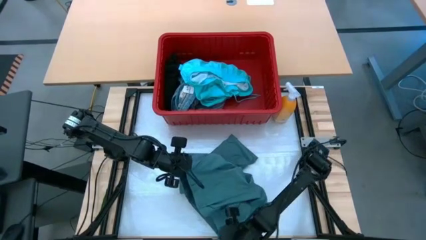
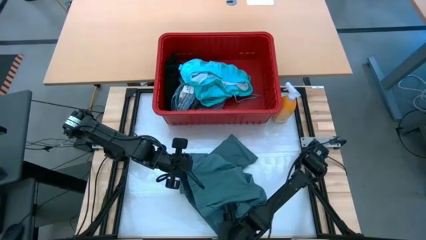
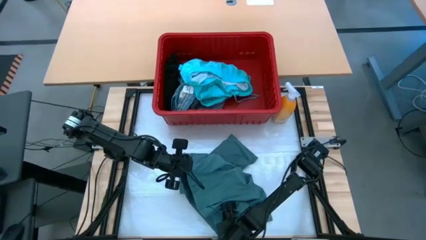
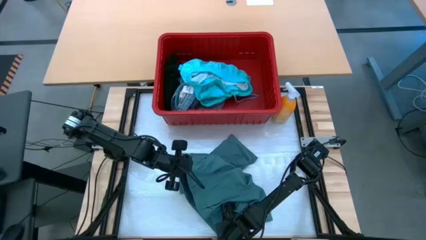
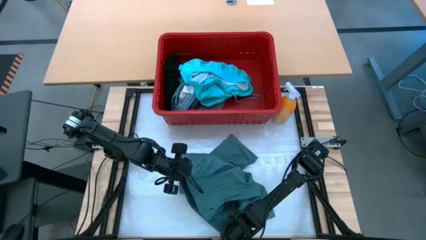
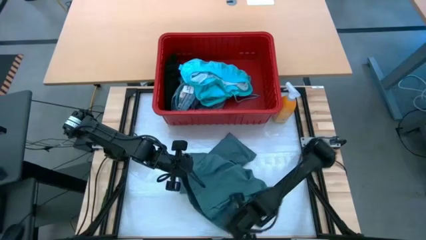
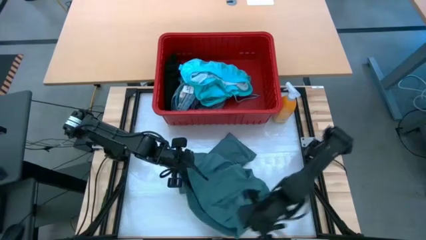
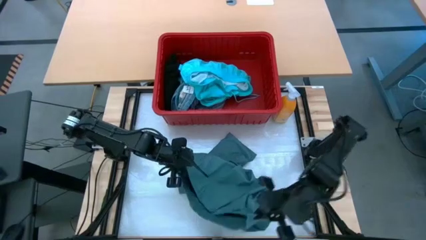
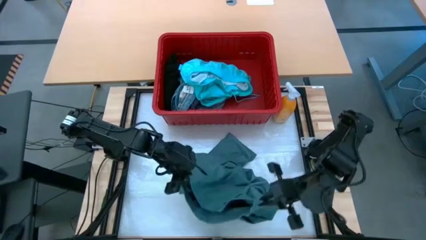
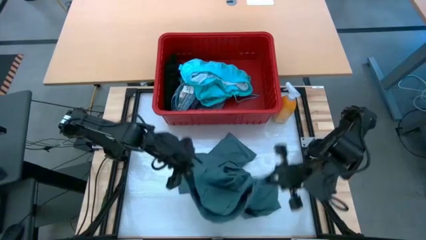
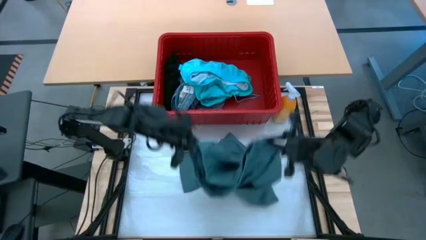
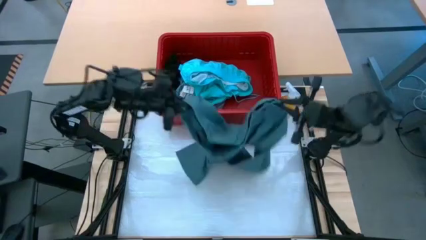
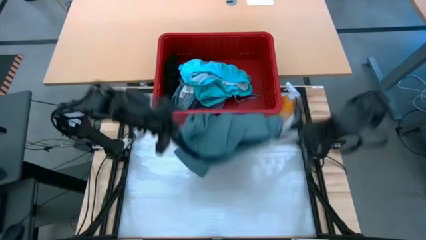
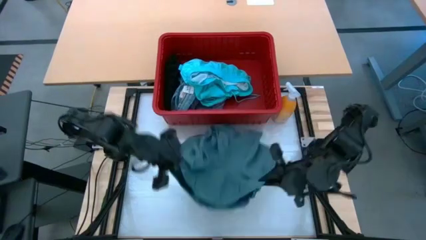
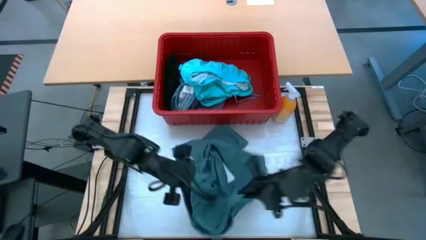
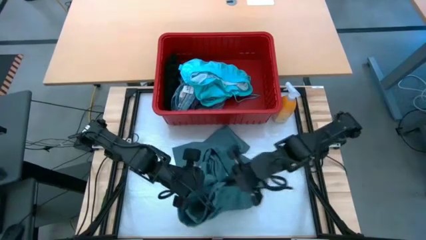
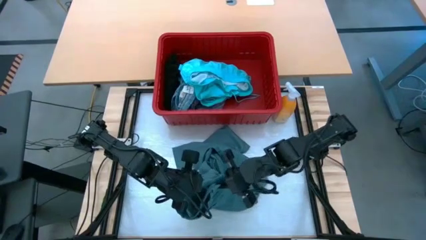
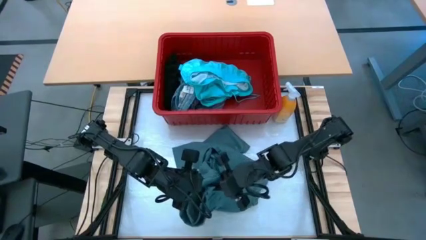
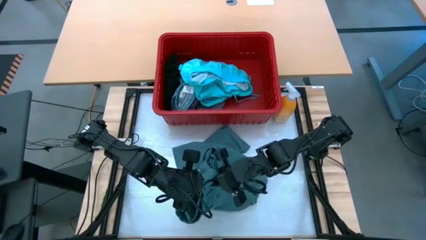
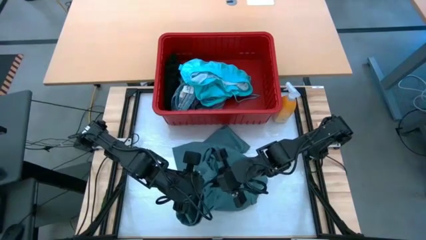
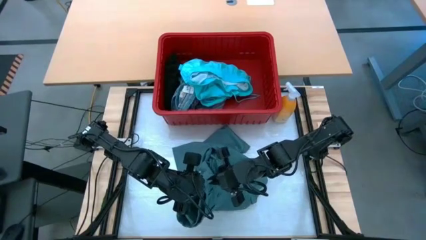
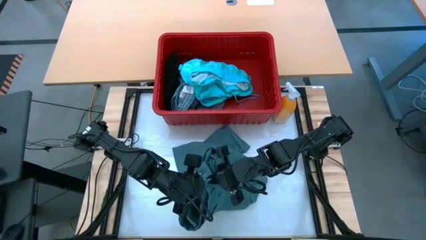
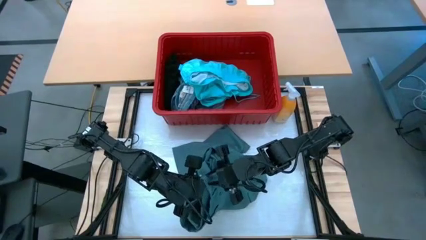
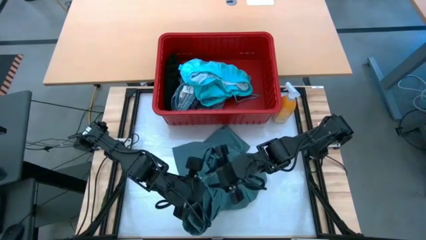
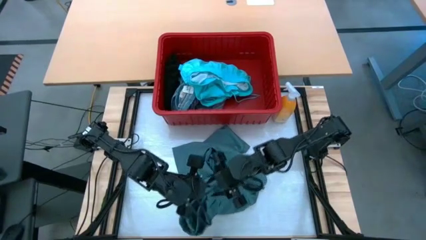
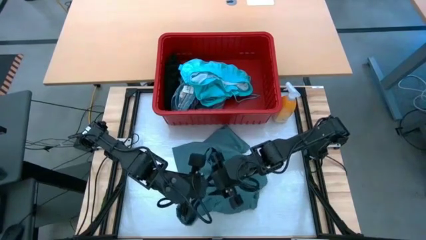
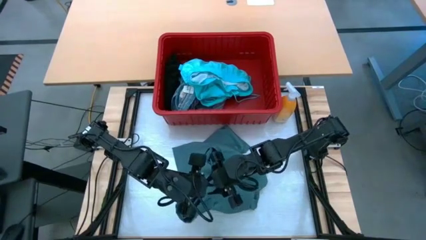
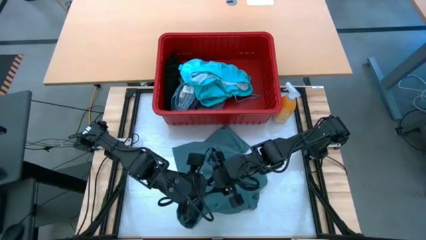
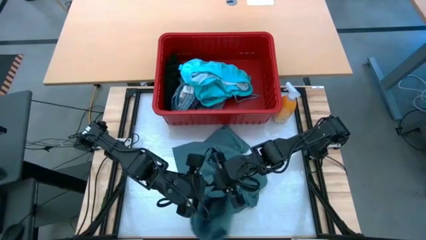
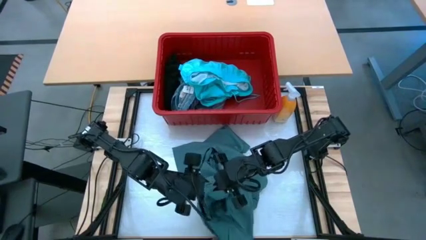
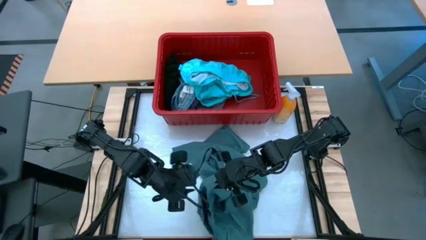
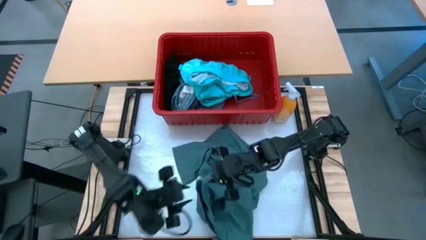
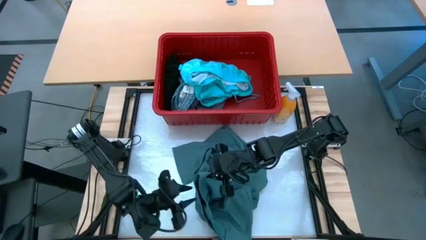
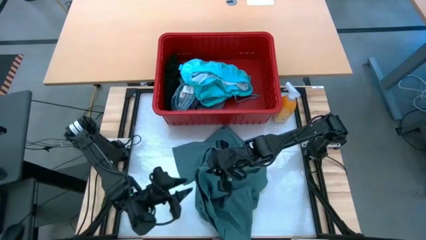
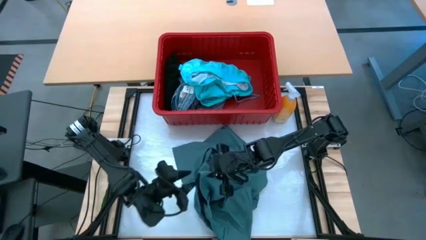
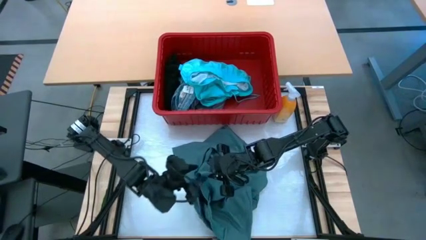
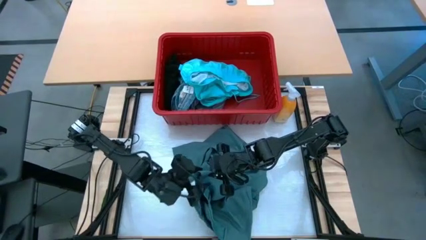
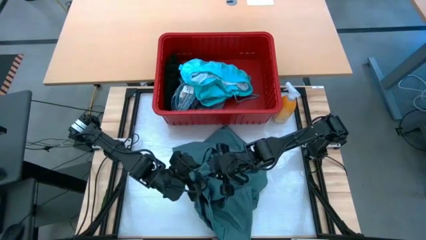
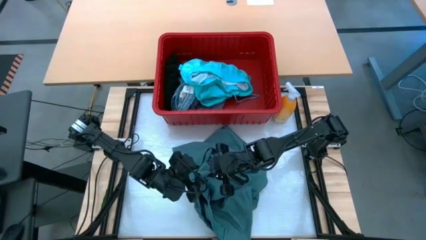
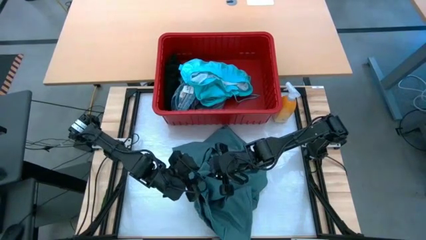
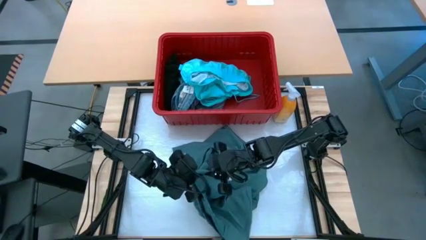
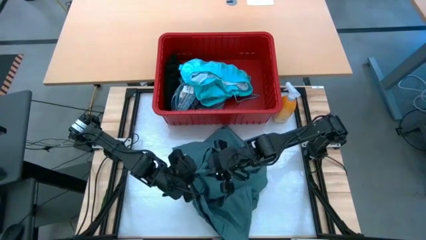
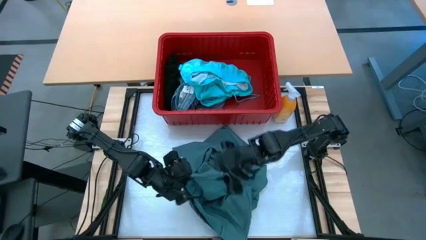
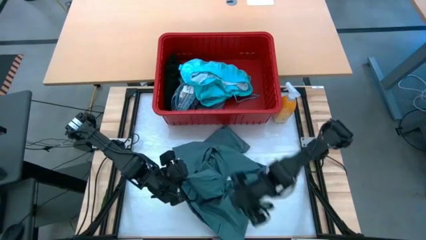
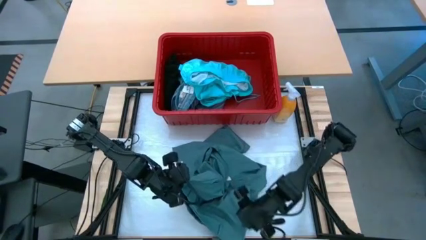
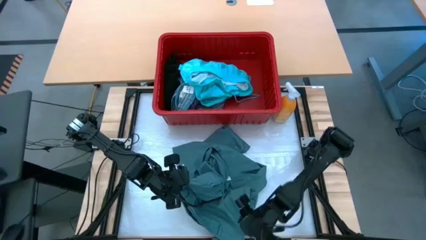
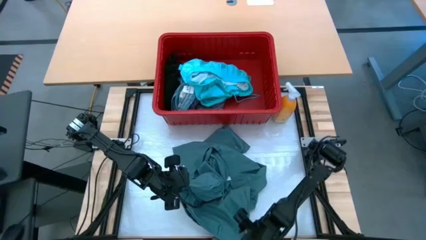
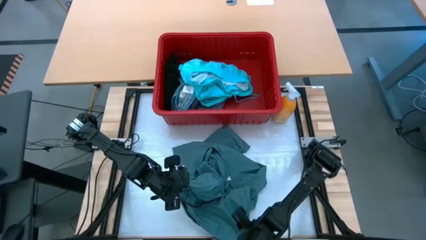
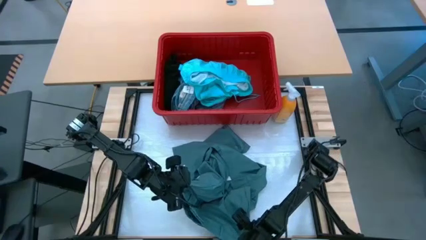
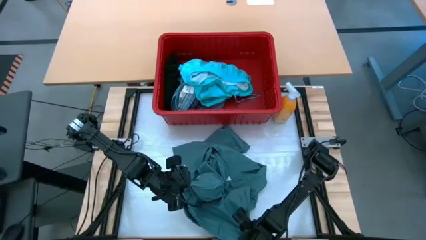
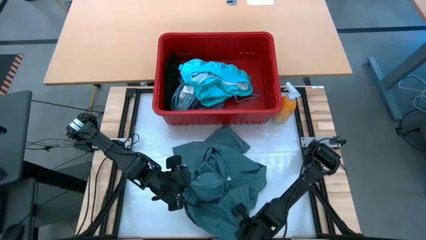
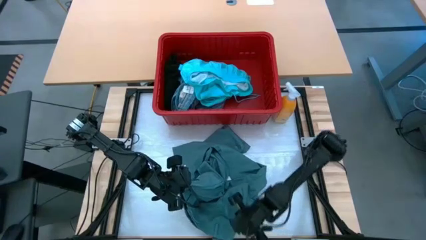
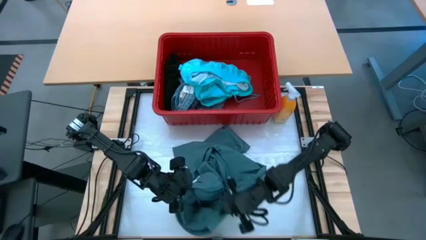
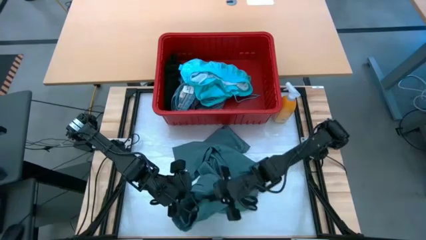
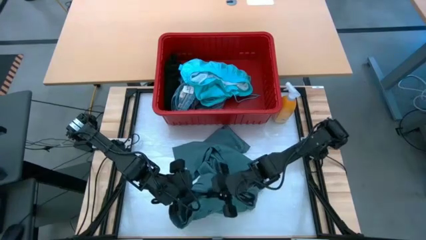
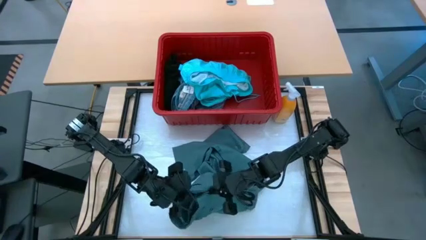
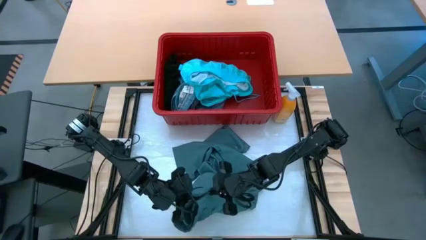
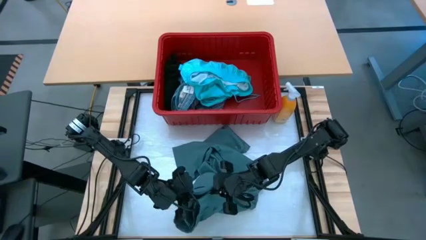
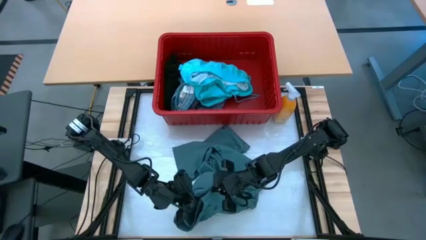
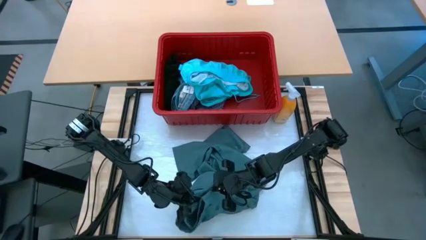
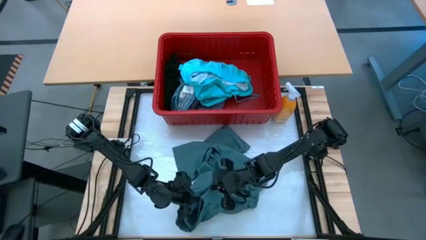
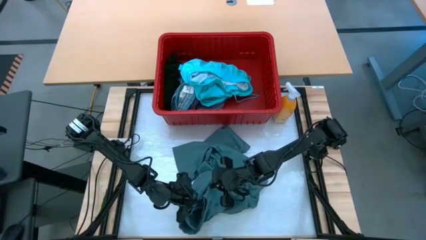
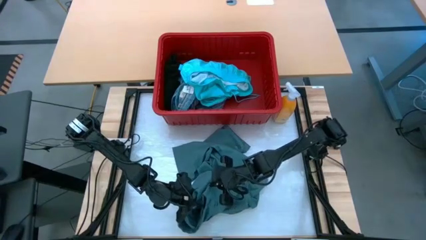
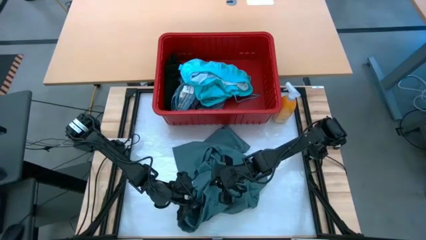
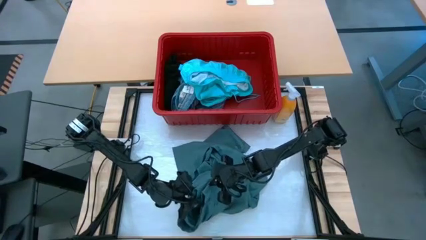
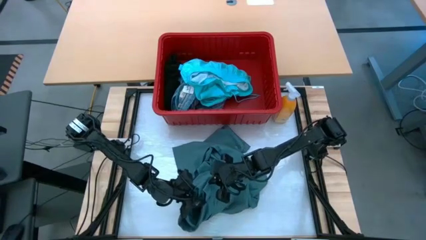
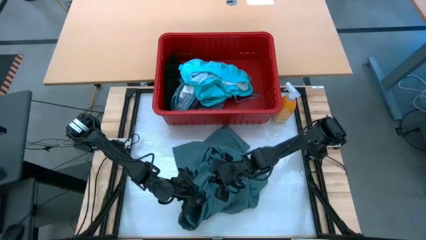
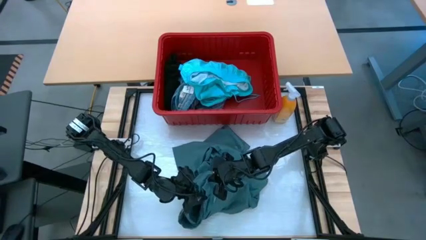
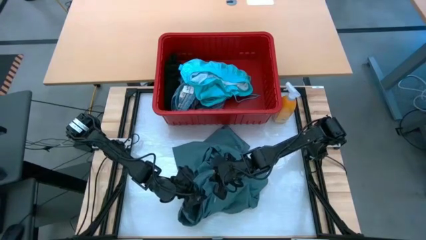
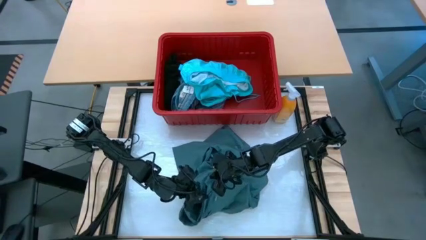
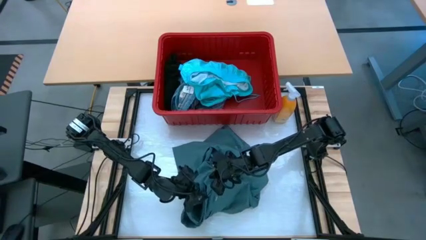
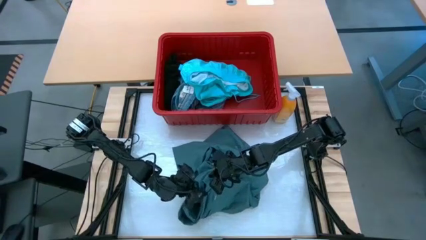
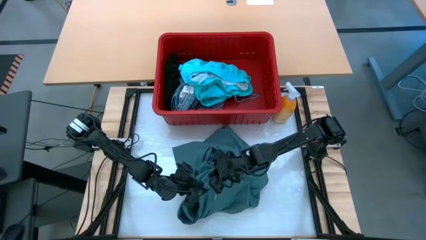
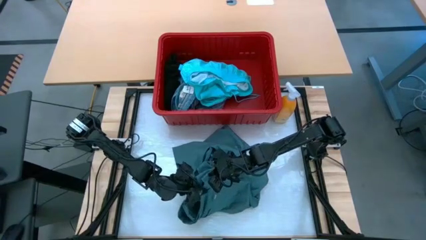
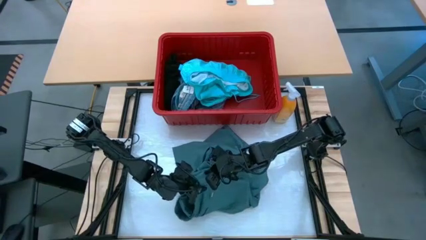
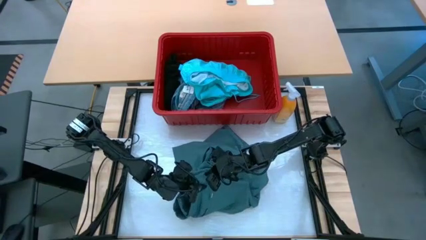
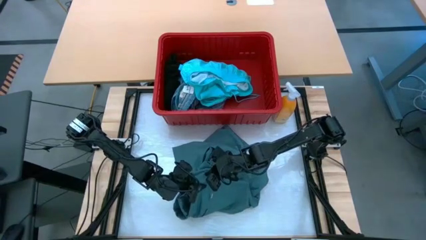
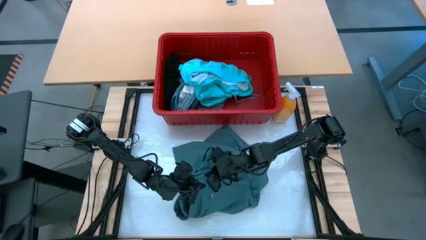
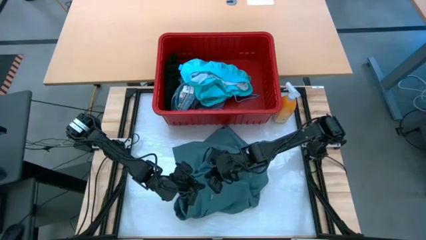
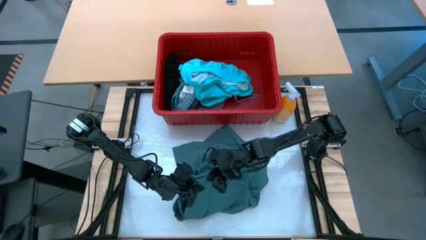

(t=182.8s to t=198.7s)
Task: Fold Laundry from Bin
Fold the light blue pants
